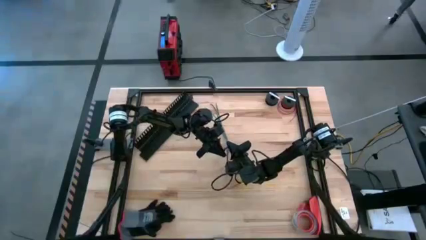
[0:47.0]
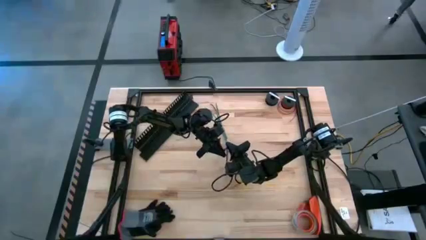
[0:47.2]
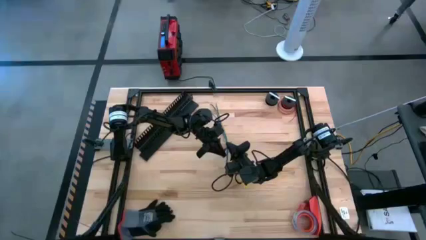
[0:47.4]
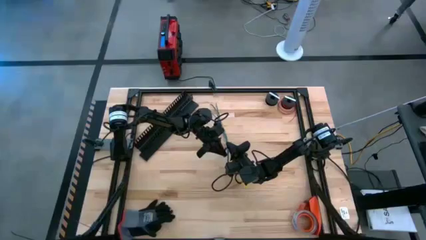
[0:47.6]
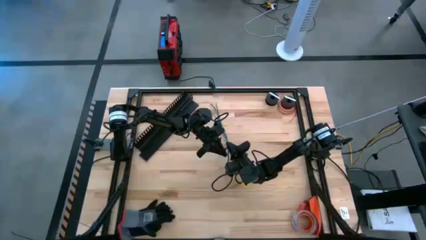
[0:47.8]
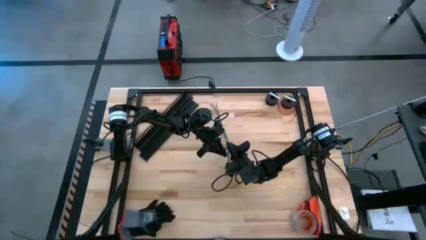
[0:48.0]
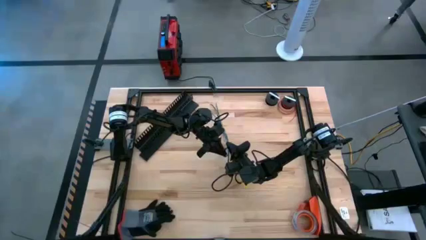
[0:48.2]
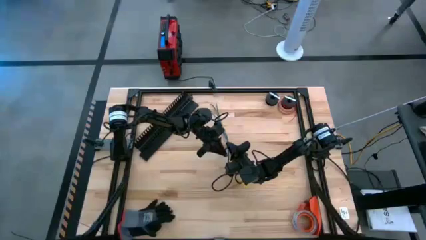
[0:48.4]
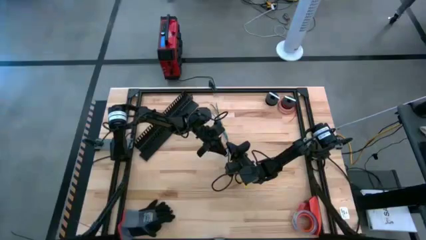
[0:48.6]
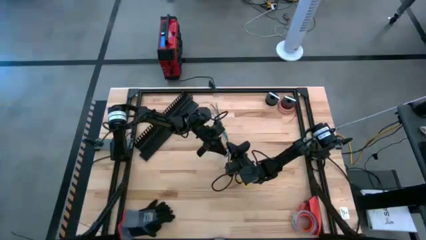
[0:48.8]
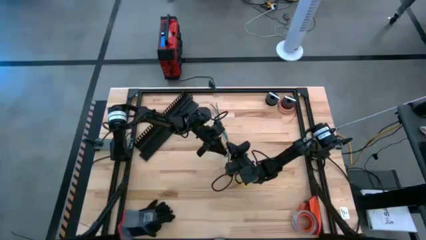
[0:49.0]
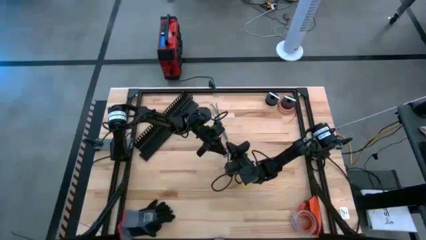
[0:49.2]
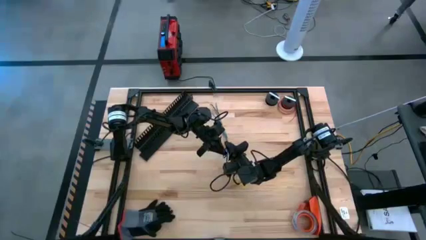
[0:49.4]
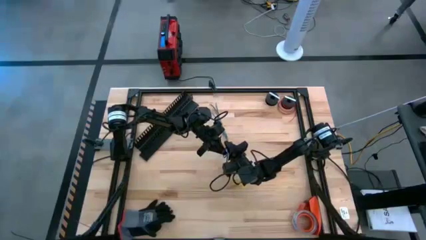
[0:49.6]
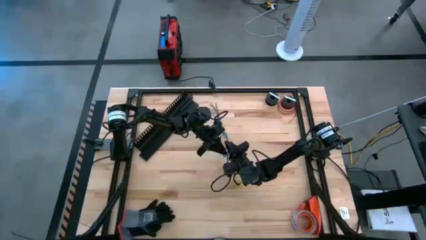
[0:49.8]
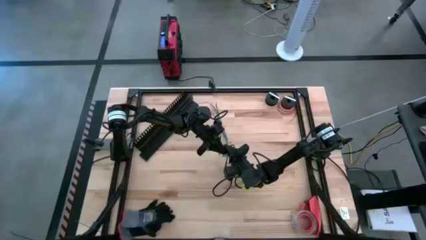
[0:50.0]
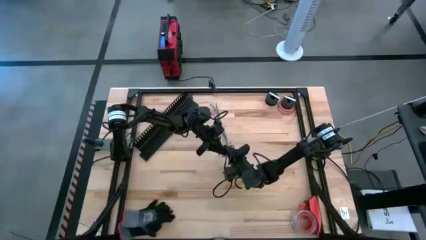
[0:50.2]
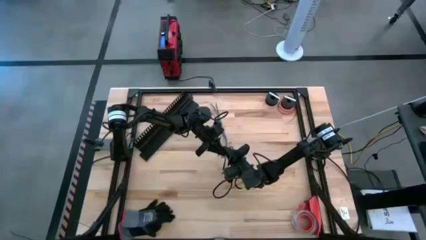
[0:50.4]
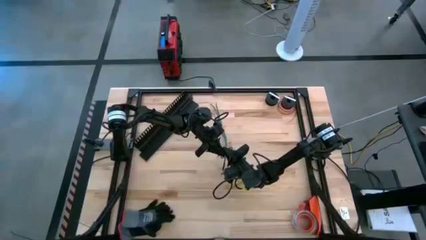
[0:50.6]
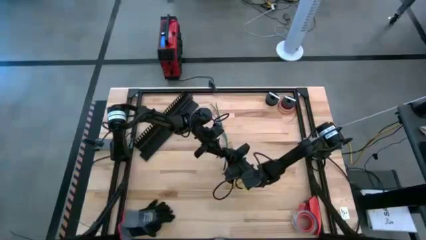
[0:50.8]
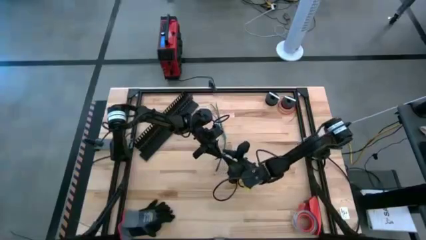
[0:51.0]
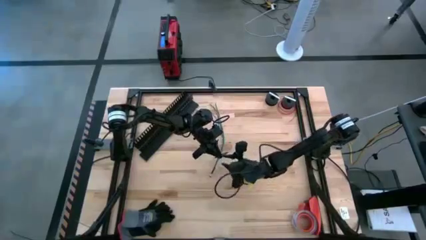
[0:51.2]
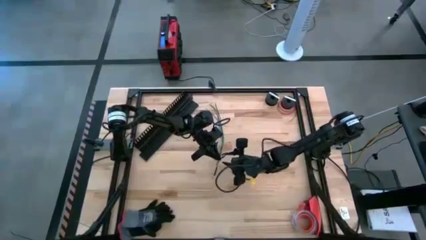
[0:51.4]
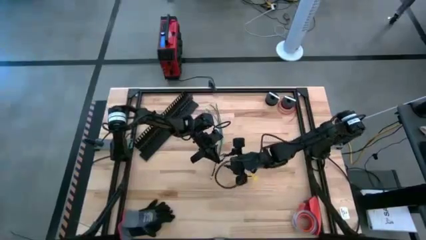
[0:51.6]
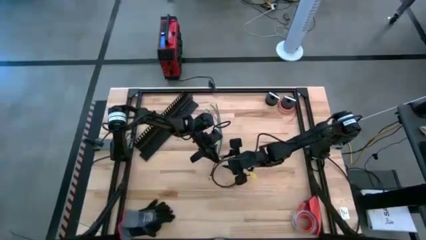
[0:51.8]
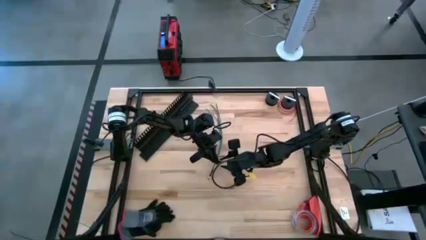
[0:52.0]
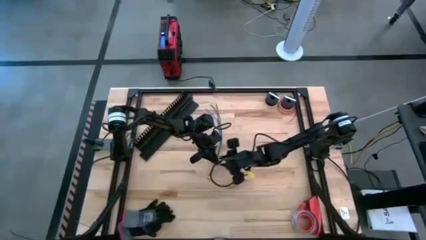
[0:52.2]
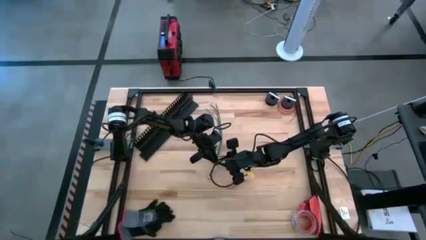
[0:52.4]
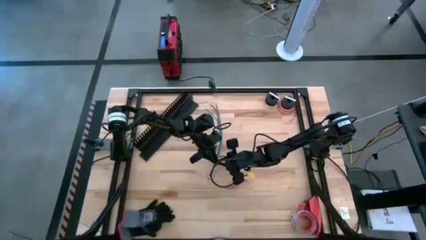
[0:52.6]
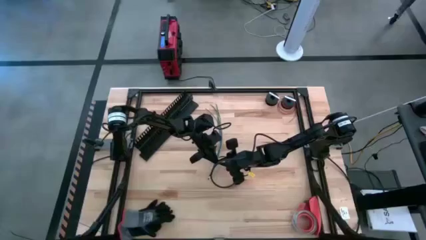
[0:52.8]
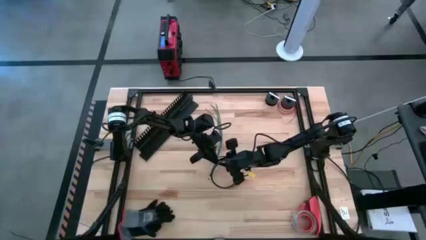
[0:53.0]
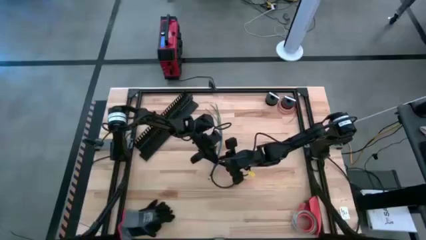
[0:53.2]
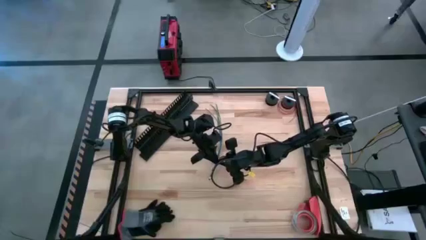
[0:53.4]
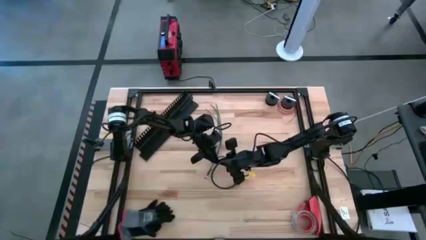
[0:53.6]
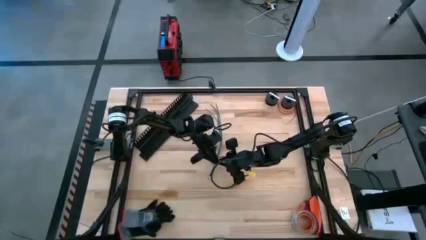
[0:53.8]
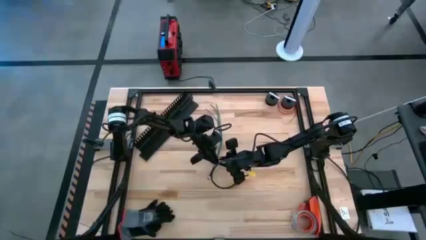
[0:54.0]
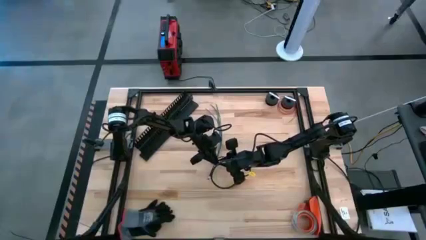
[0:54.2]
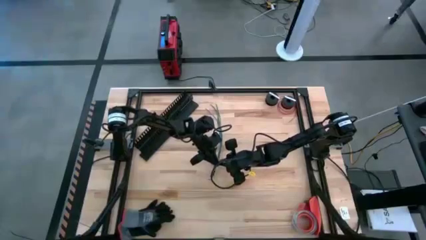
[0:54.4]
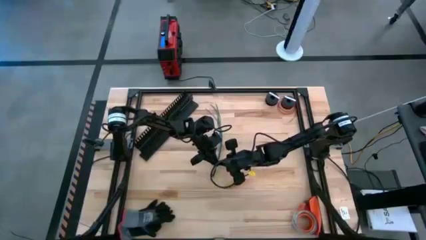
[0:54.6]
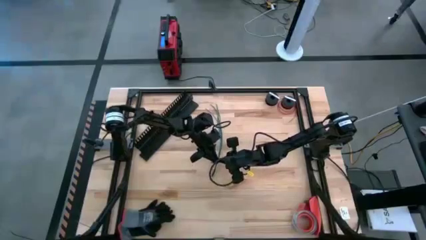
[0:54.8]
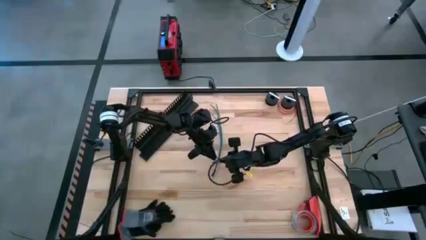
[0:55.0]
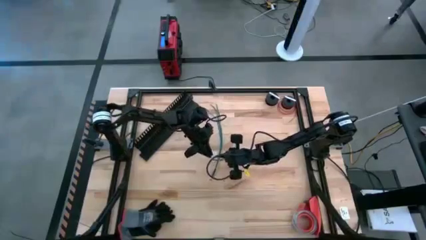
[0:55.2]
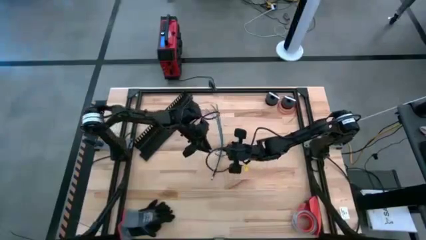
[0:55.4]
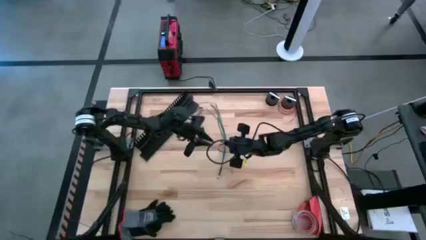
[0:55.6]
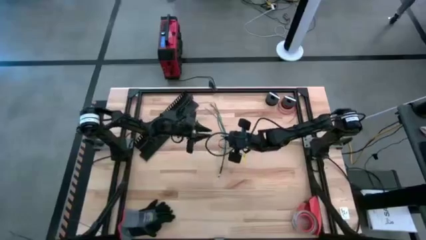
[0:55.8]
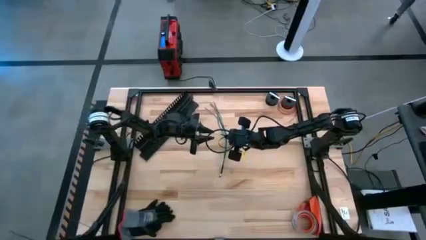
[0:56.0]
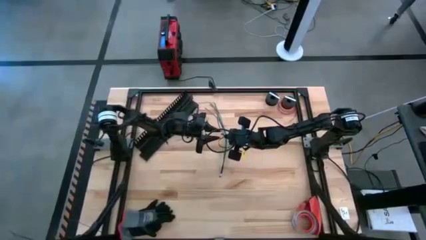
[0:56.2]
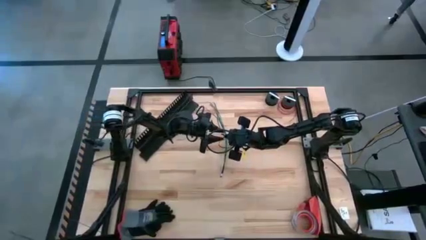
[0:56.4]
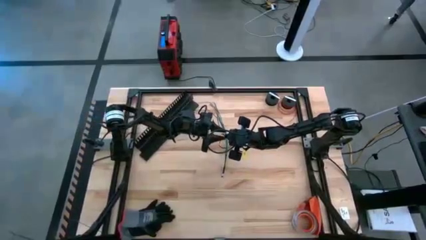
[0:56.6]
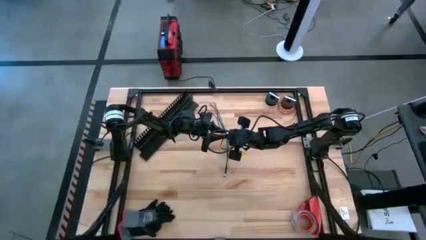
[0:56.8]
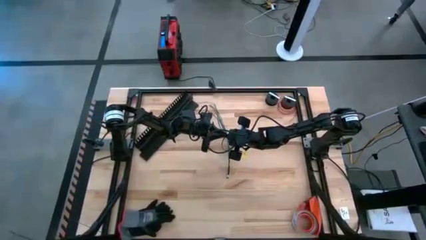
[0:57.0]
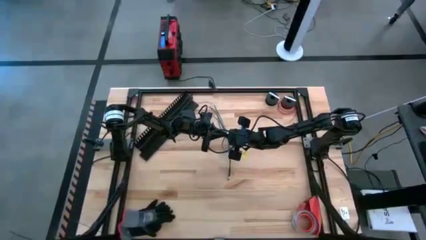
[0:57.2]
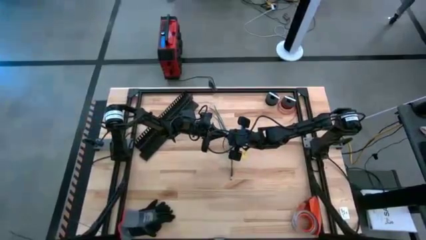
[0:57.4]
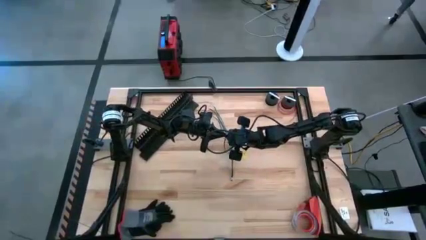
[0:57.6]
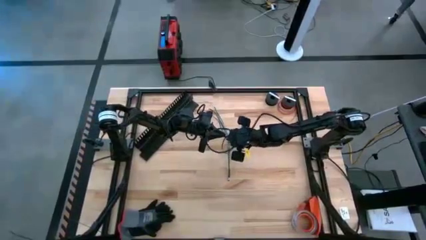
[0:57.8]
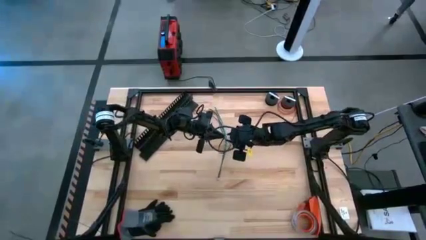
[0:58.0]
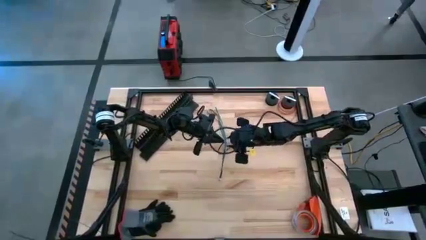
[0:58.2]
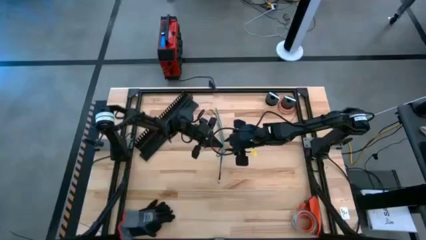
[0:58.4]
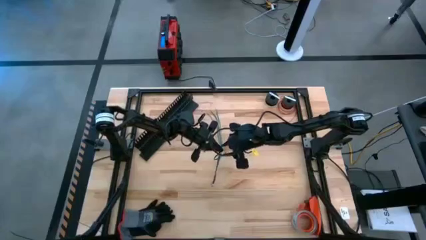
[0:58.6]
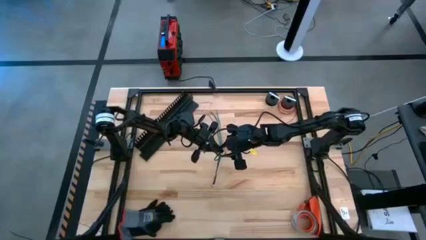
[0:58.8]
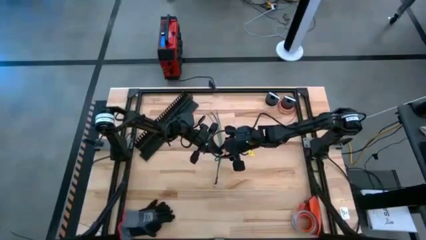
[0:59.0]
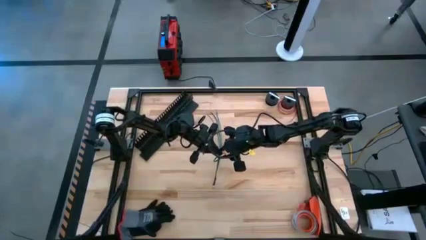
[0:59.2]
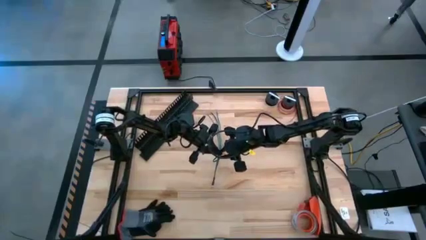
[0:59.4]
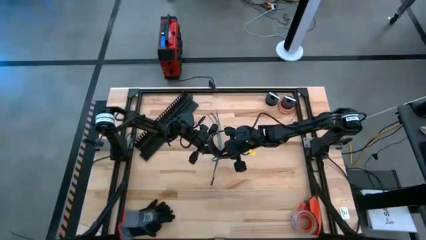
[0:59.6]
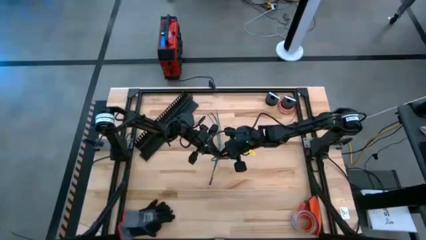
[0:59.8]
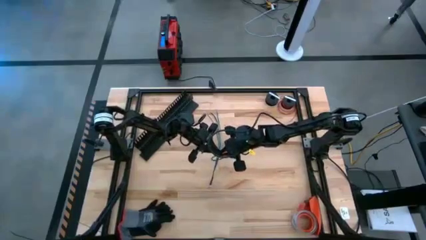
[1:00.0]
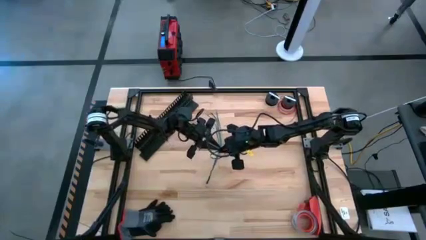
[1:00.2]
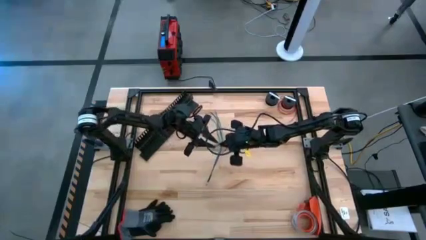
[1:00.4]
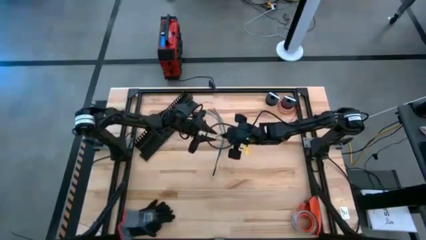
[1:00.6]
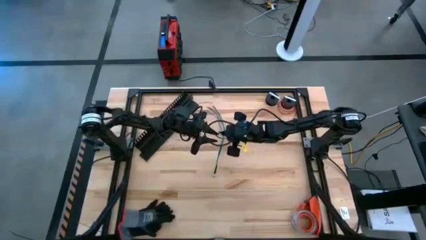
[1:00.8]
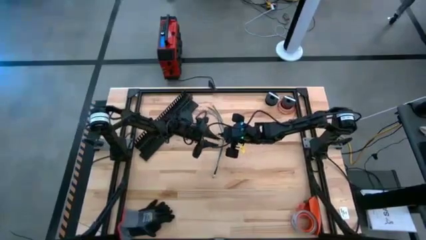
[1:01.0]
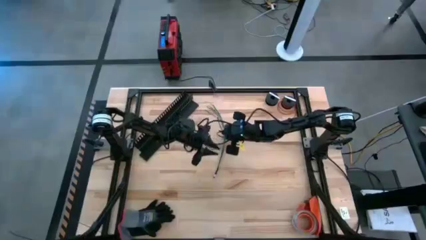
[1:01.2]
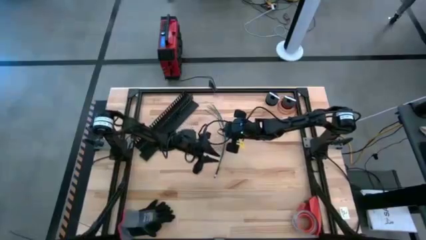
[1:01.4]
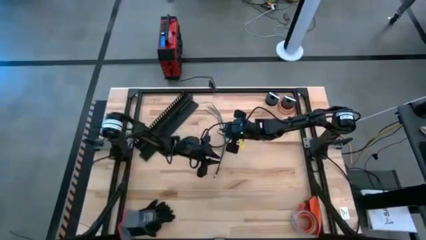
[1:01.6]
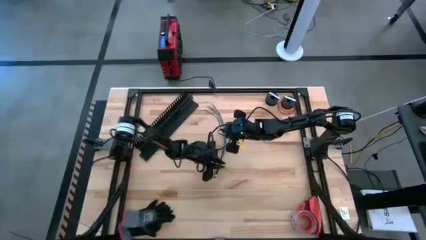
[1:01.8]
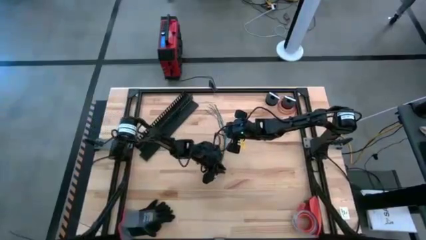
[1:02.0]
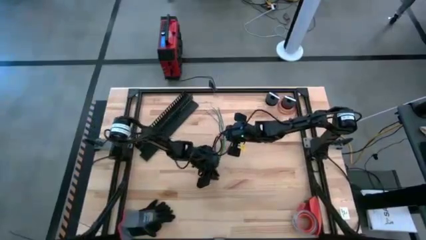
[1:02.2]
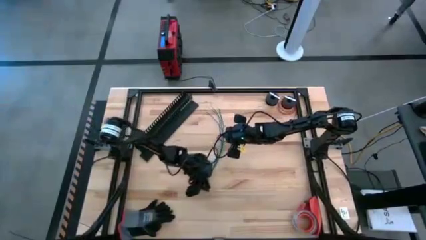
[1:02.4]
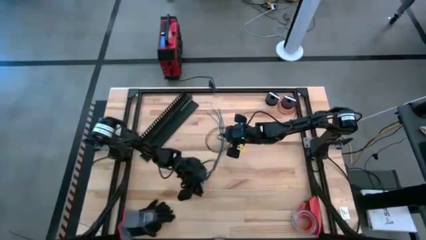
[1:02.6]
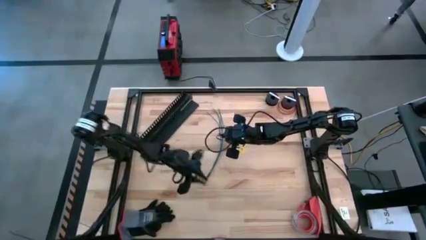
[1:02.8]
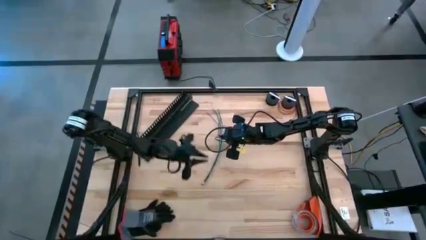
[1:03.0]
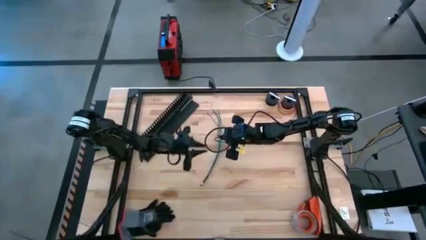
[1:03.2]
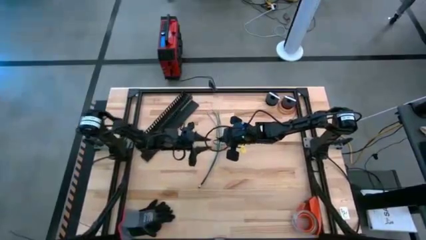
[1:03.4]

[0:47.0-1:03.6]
Task: Ziptie cables
Wrap the cable wires together using a black zip tie

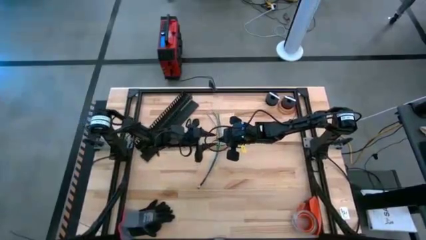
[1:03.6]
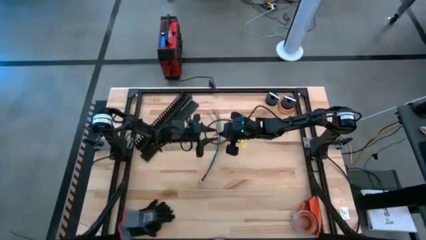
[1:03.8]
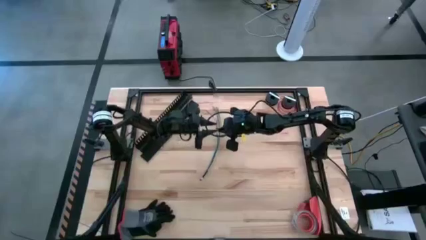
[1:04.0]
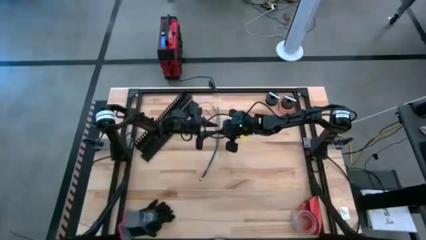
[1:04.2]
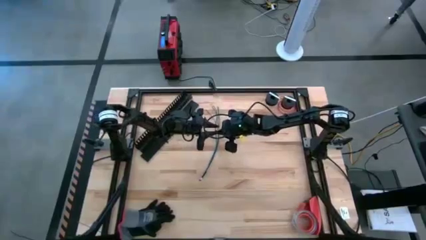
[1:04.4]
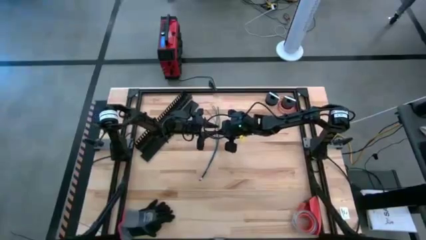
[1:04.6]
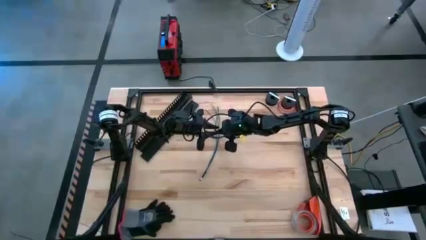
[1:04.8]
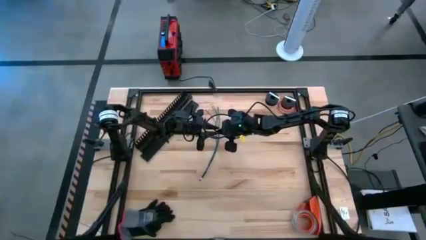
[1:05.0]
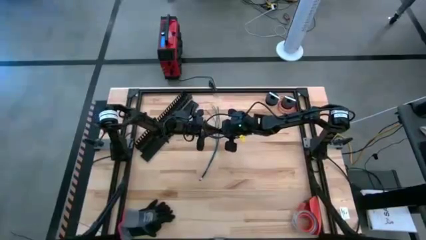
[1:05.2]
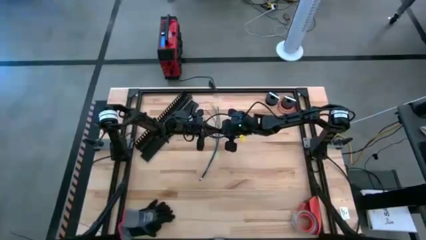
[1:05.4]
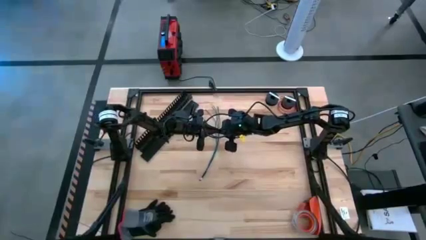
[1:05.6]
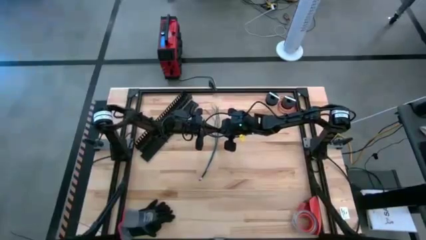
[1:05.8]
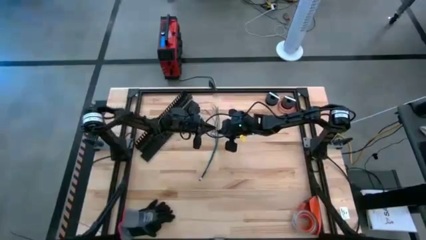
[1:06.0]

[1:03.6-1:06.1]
Wrap the cable wires together using a black zip tie
